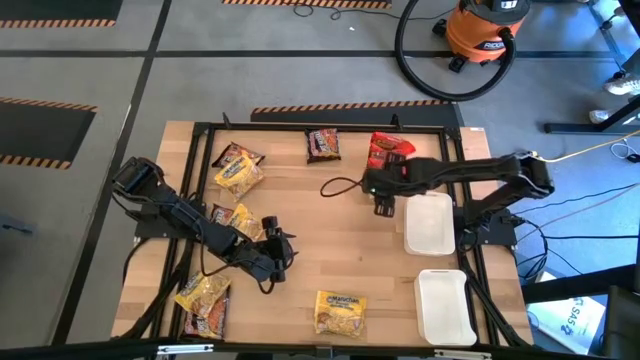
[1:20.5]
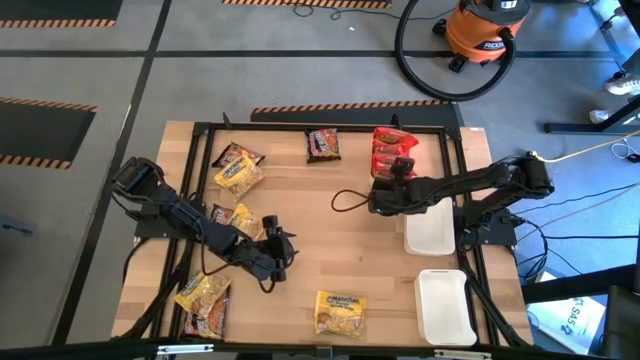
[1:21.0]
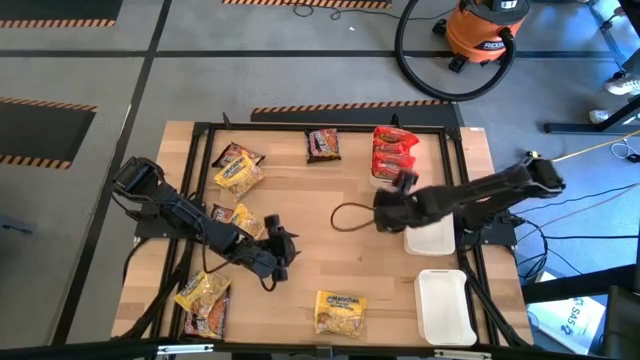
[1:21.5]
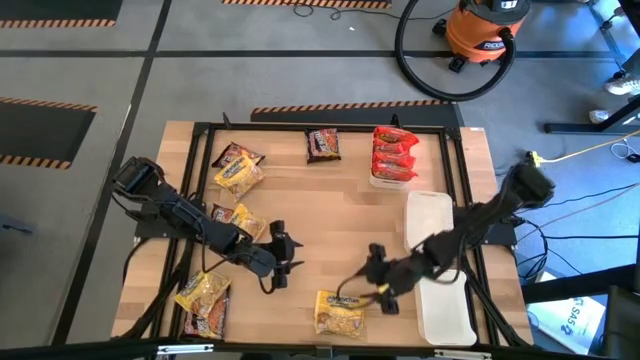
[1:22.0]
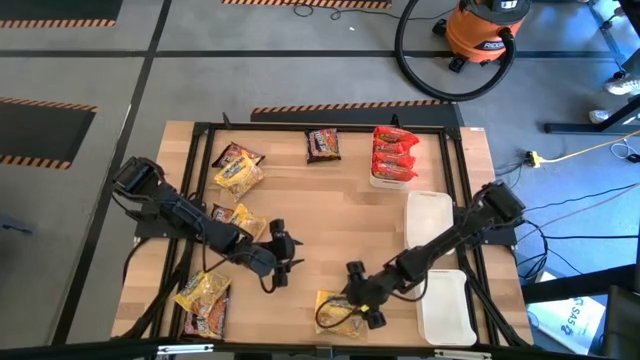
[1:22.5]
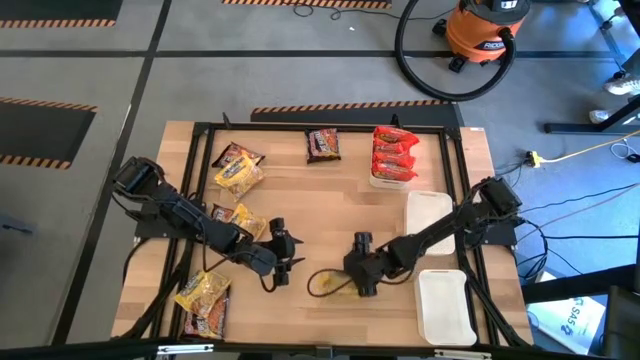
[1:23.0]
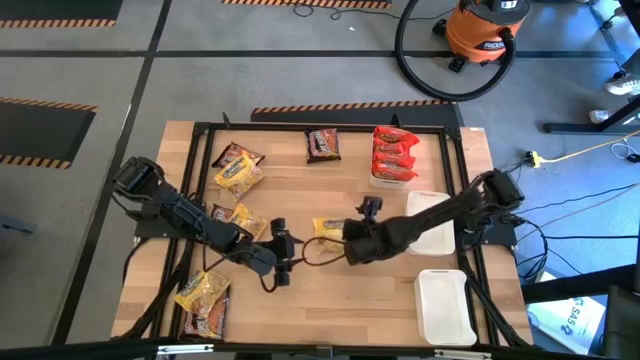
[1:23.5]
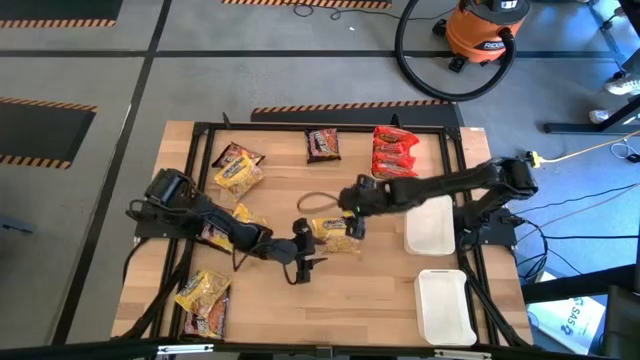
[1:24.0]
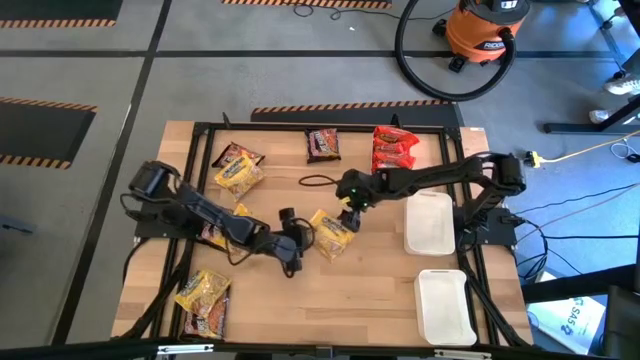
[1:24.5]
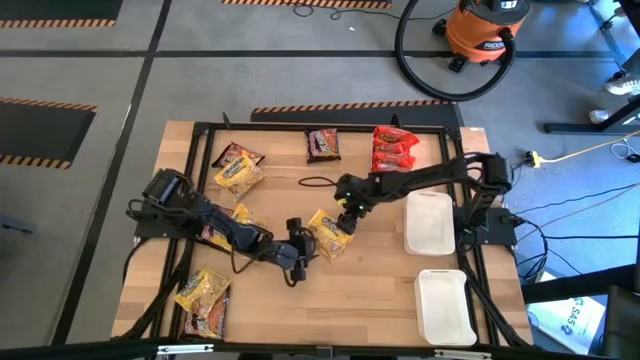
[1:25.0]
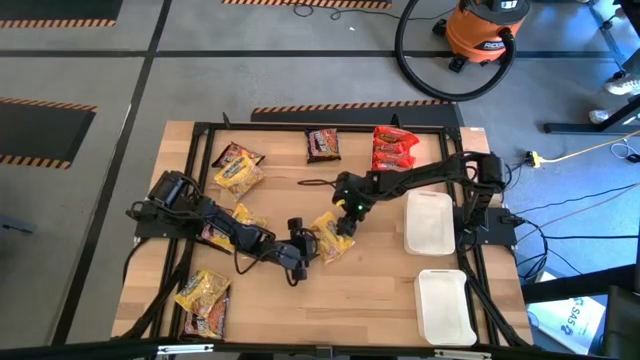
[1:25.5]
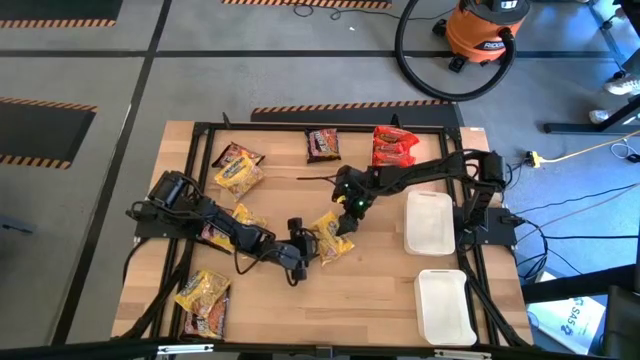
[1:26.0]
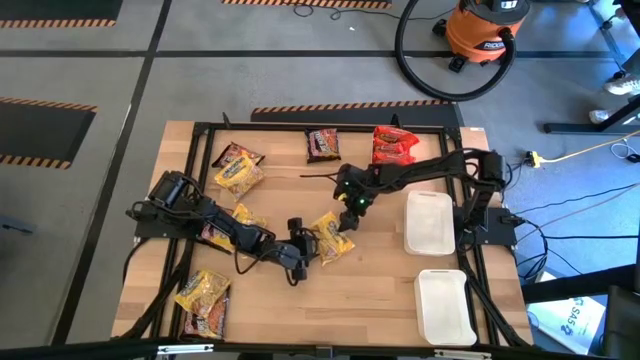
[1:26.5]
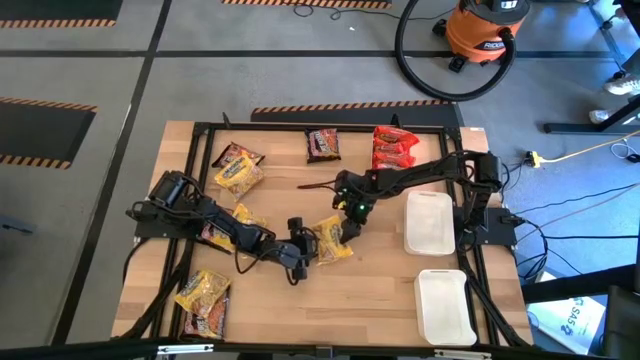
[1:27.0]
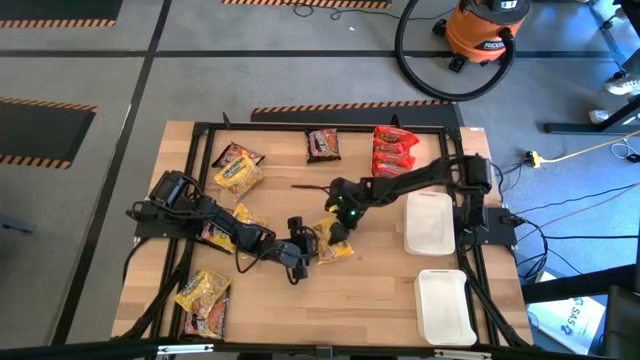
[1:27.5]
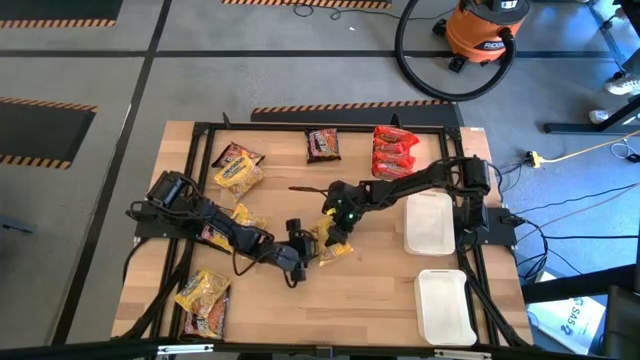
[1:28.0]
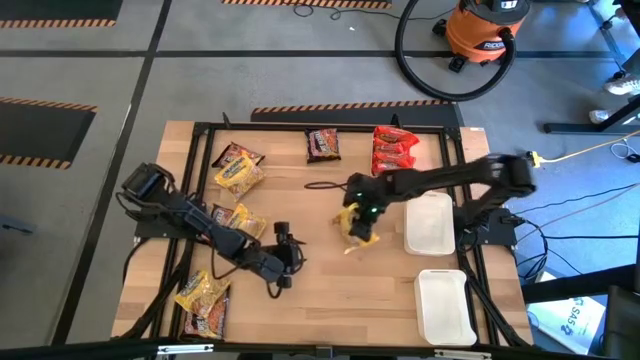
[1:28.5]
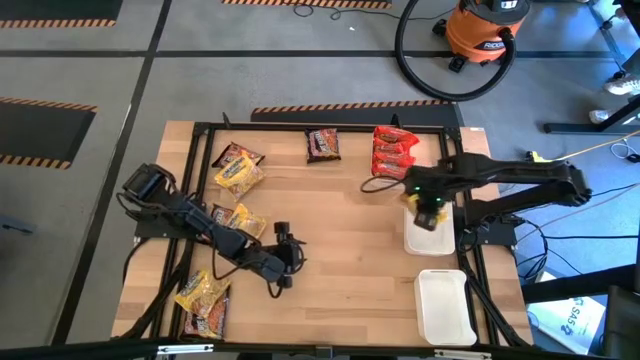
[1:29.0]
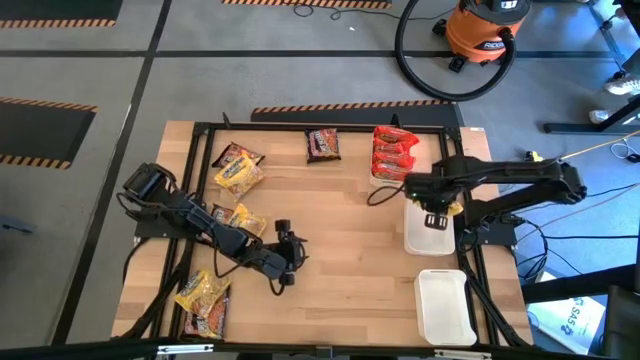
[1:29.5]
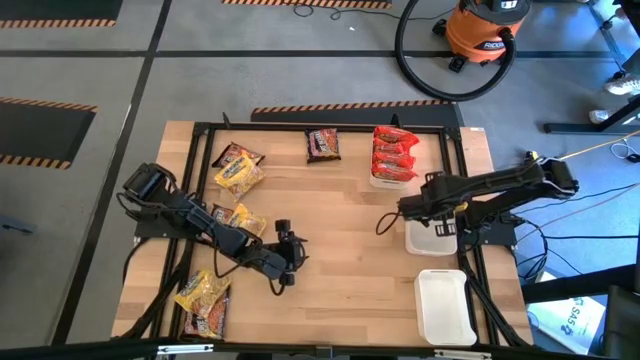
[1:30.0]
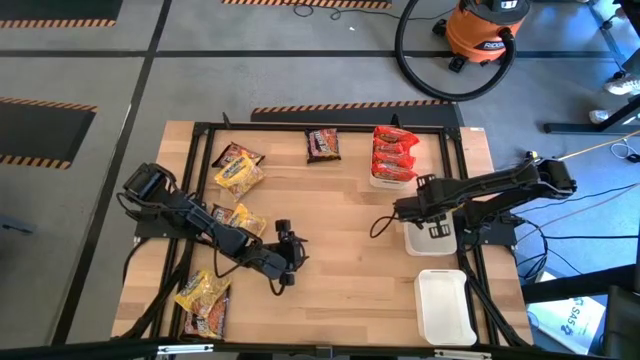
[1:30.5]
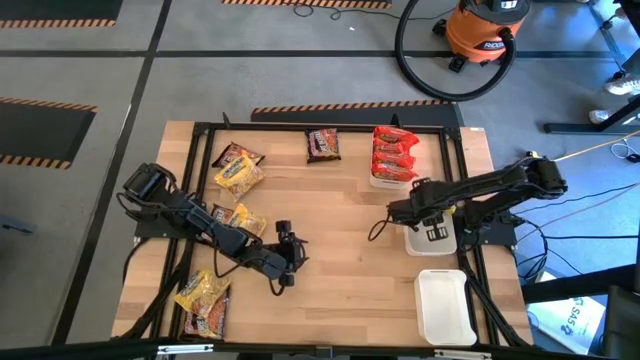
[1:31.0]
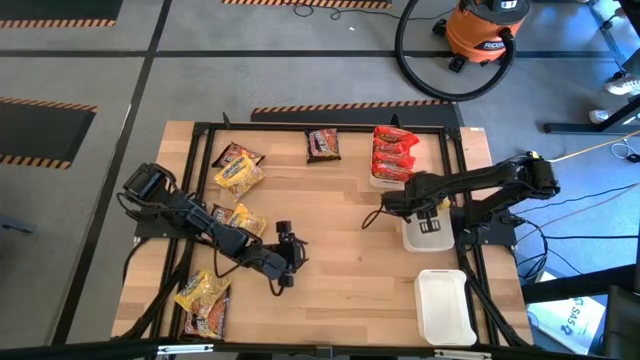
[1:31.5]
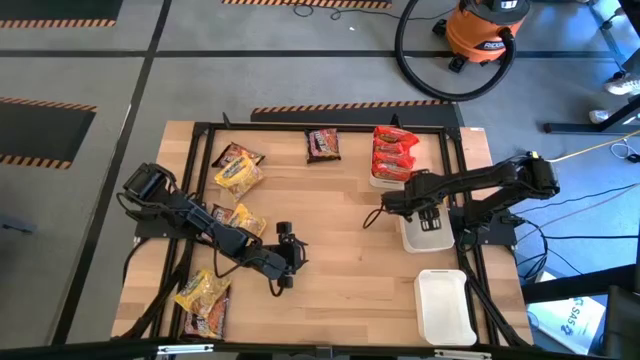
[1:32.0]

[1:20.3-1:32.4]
Task: Sort Maruchan noodles
Put the yellow noodle pack into the middle white bin

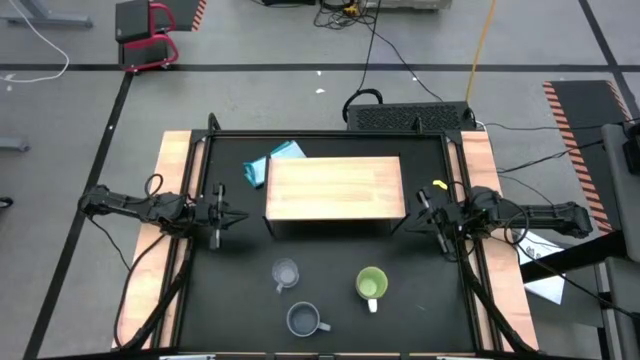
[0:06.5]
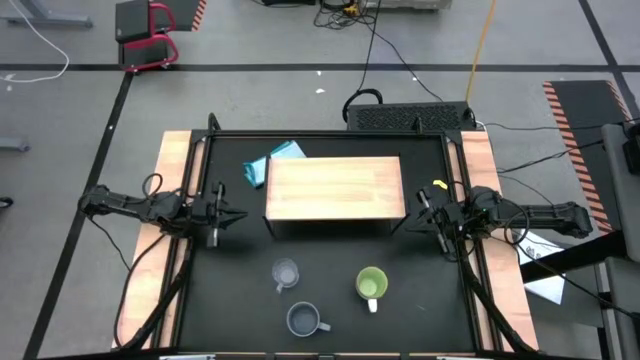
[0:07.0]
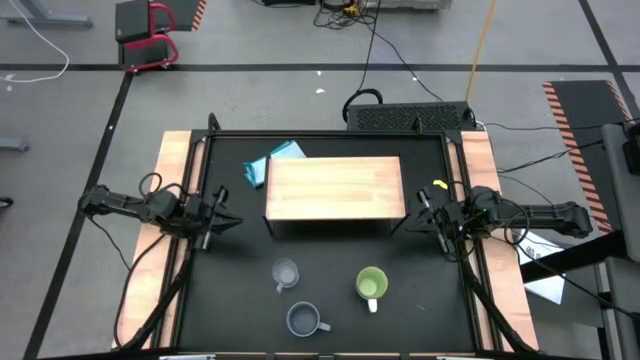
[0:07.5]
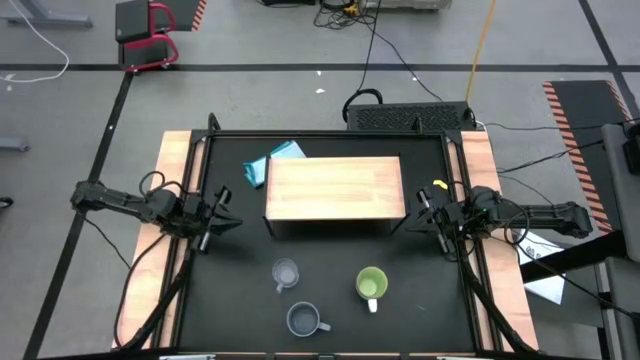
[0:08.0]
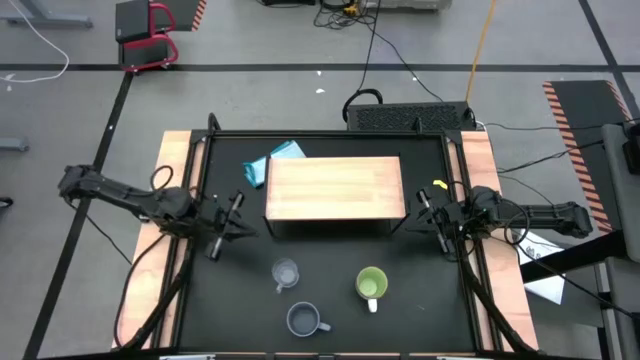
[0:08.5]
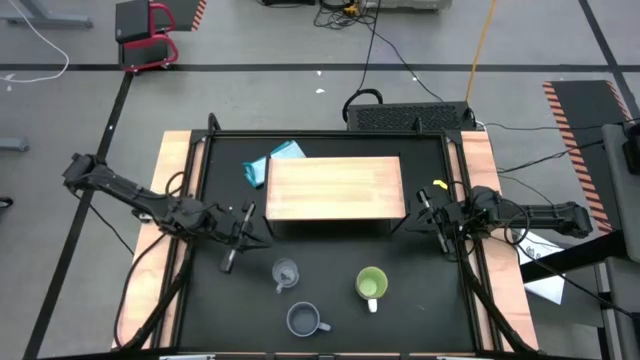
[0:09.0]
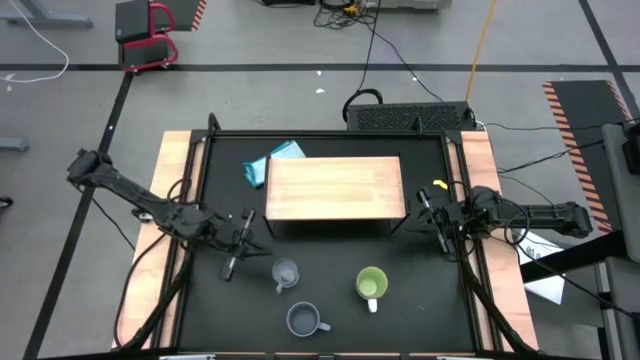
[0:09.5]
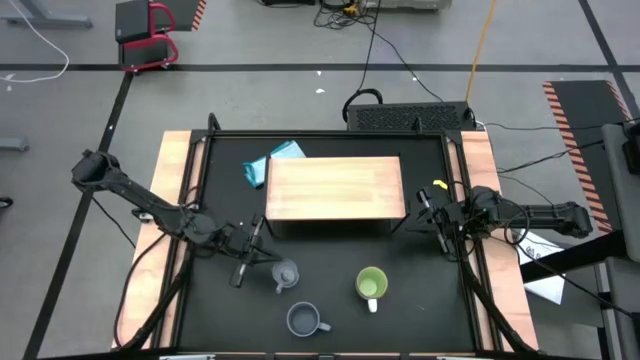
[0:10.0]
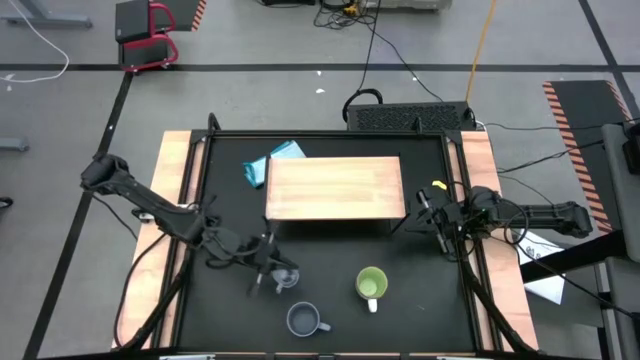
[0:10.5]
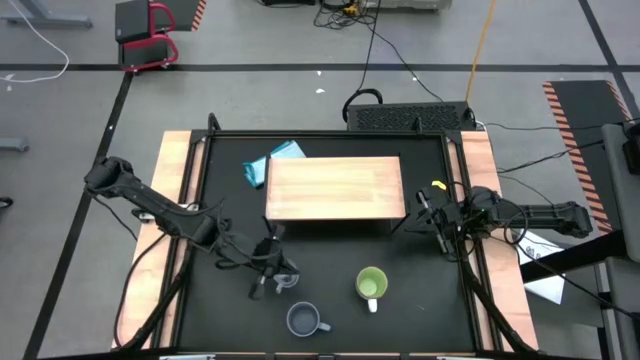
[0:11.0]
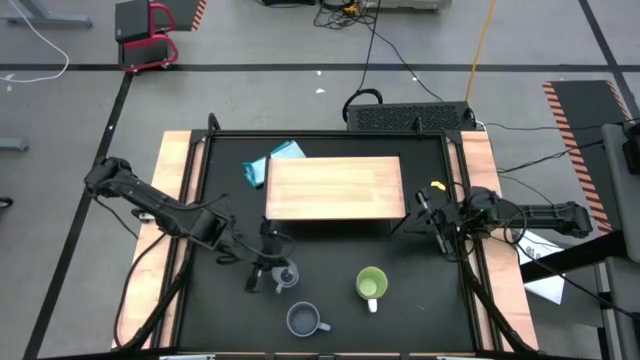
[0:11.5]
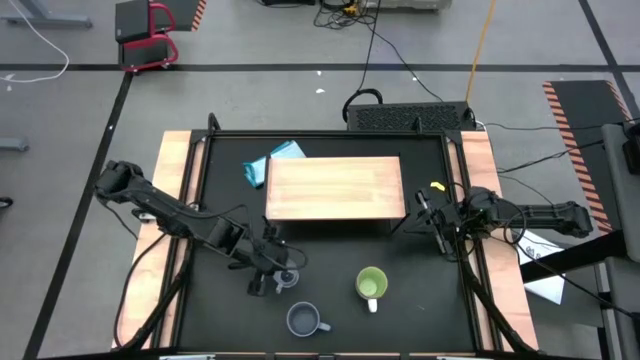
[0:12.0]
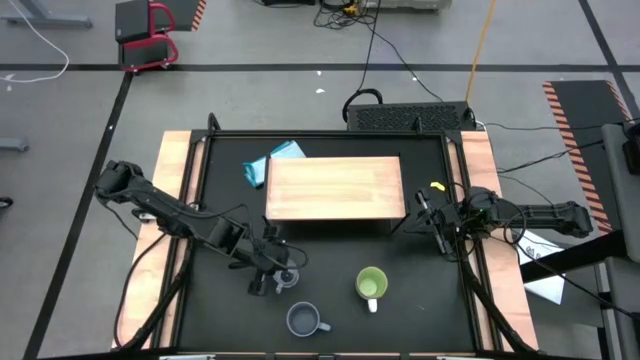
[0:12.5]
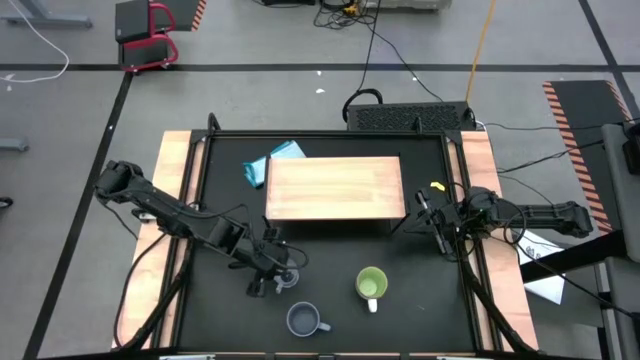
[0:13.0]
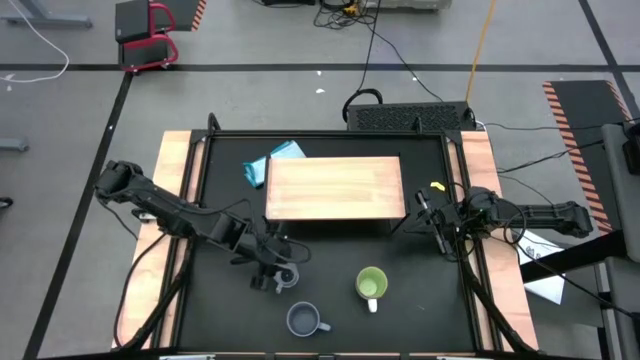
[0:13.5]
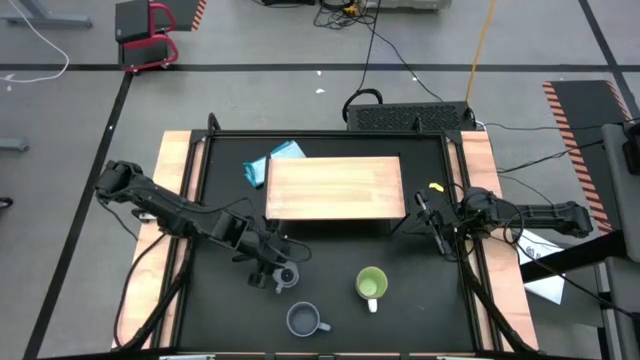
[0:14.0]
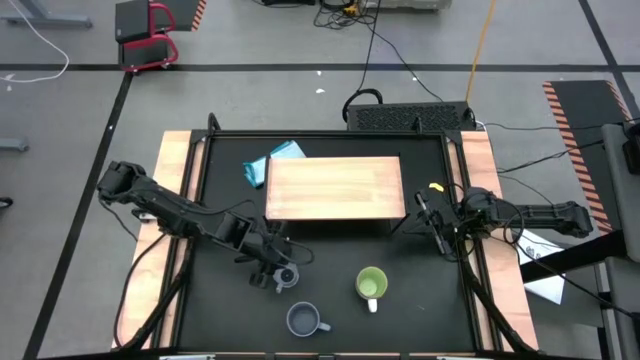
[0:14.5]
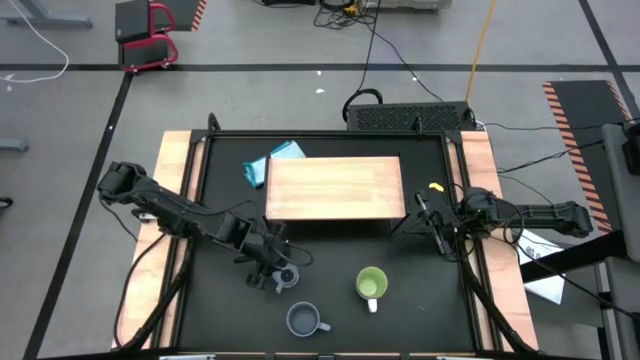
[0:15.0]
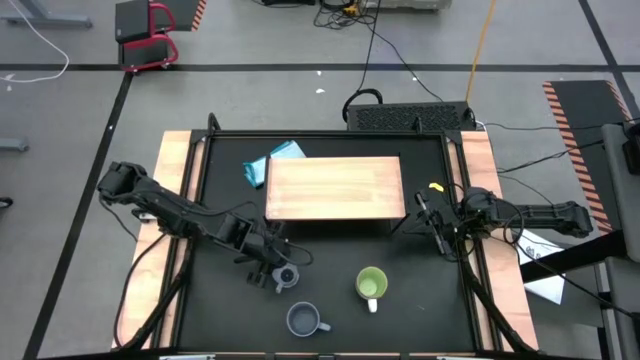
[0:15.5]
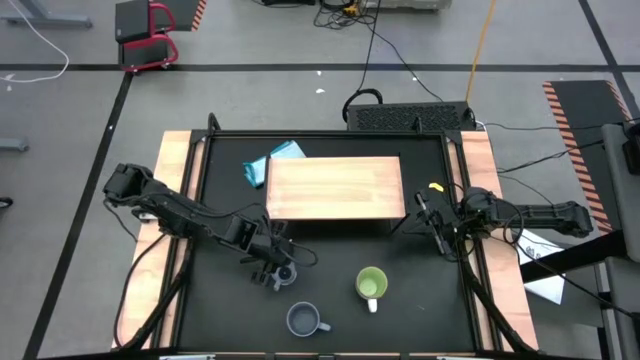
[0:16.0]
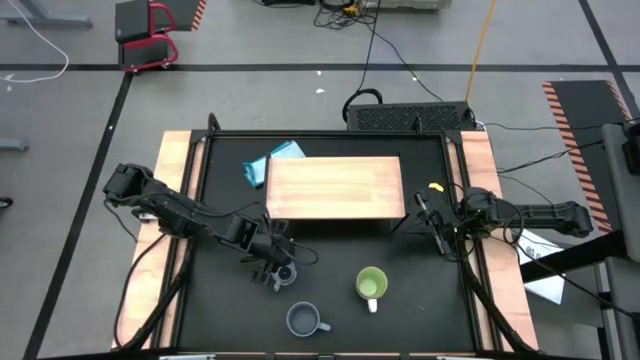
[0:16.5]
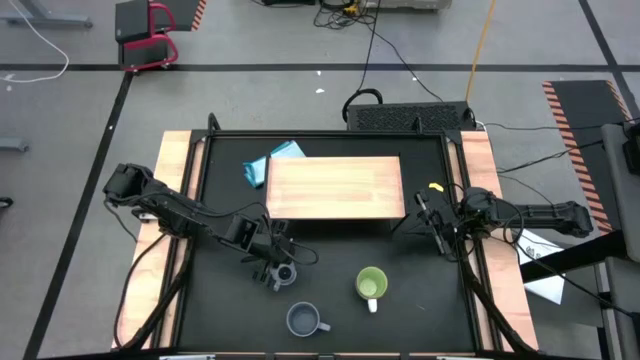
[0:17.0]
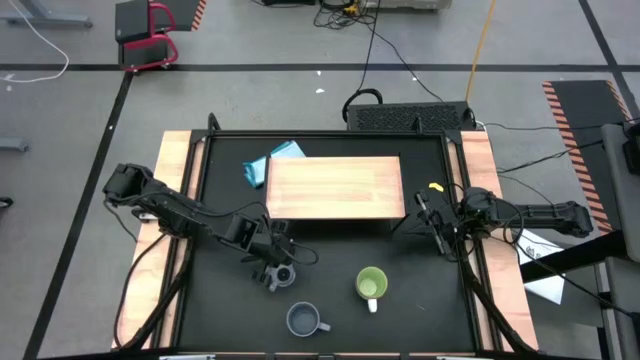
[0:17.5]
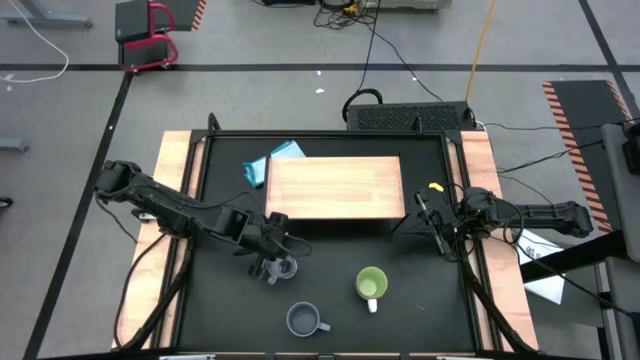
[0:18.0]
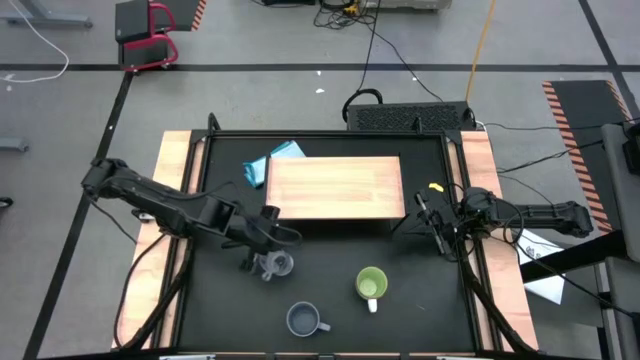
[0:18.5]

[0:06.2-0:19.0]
Task: Stack small to large cups/mugs on shelf
Put the transparent mug on the shelf
